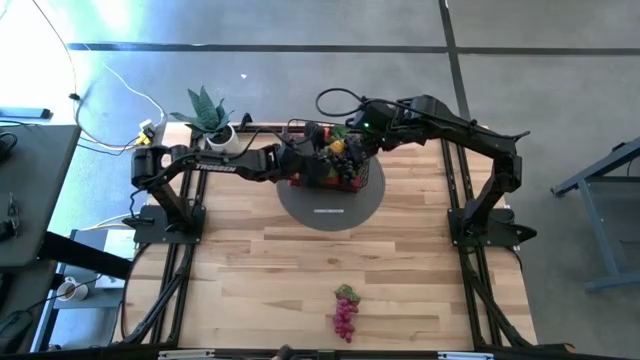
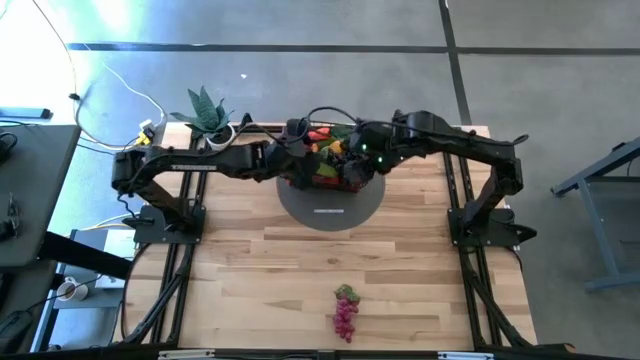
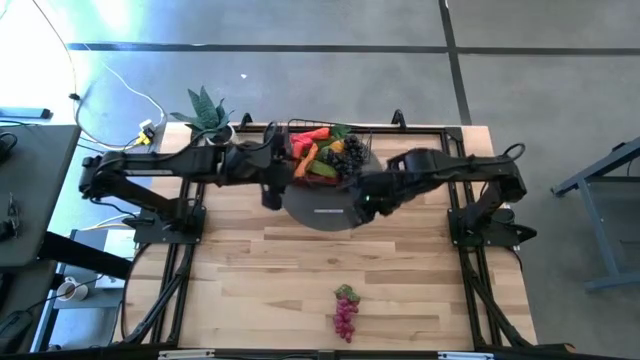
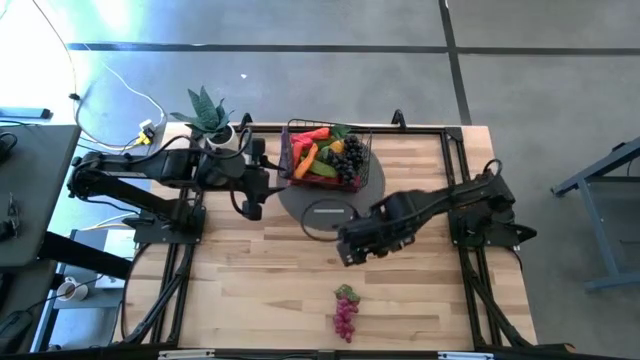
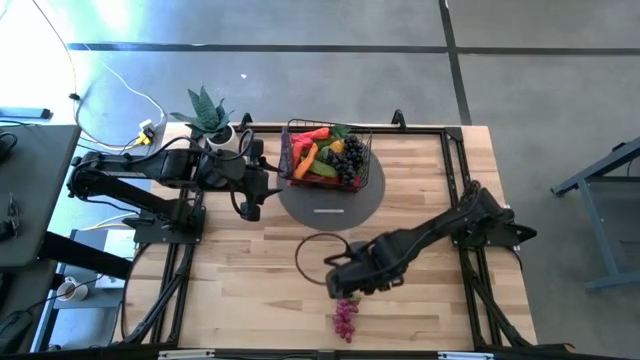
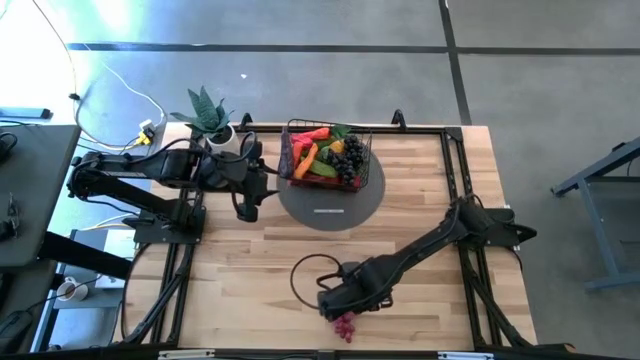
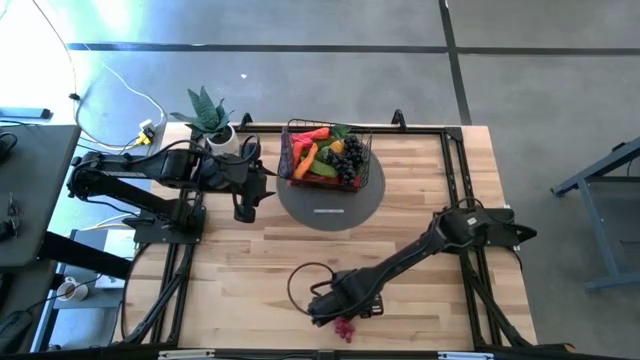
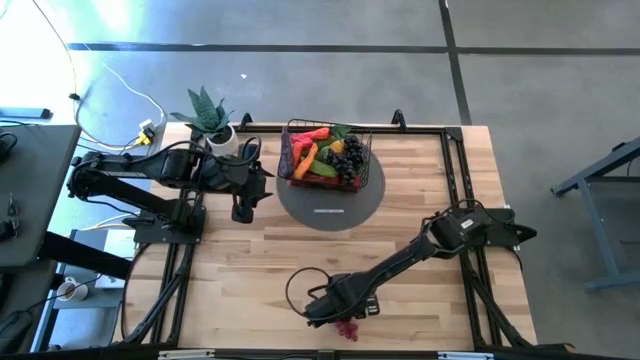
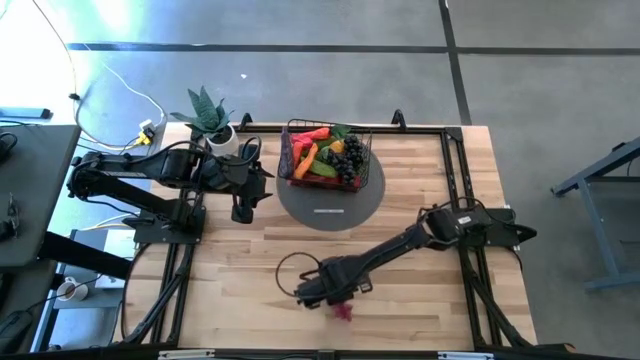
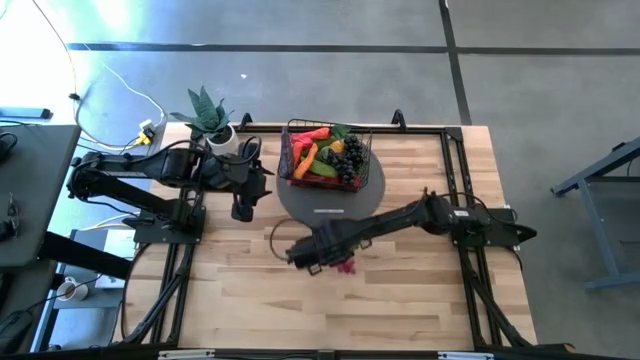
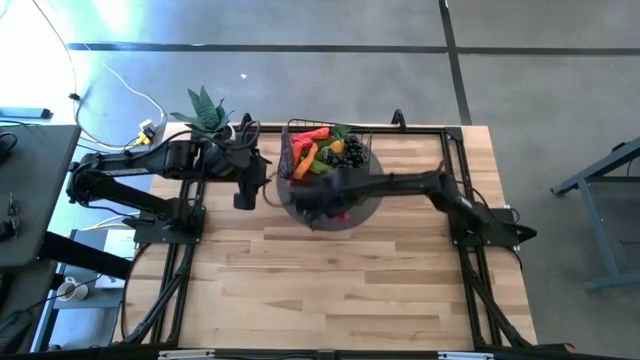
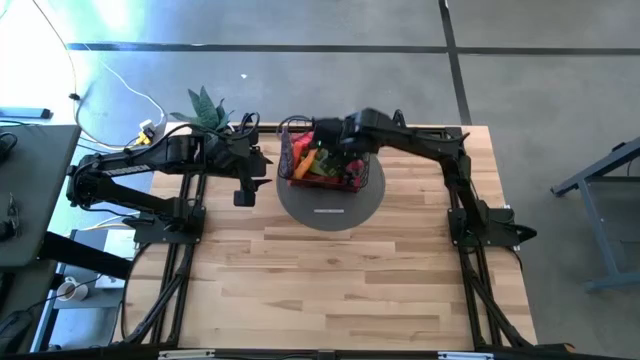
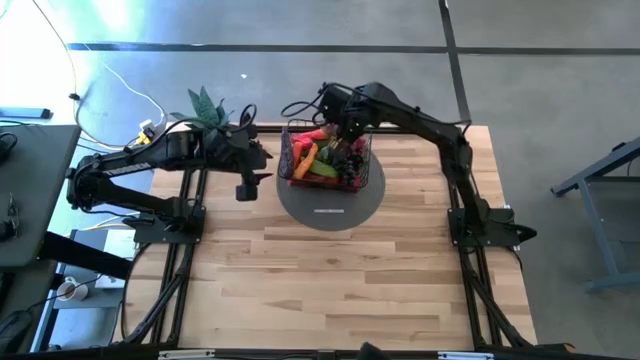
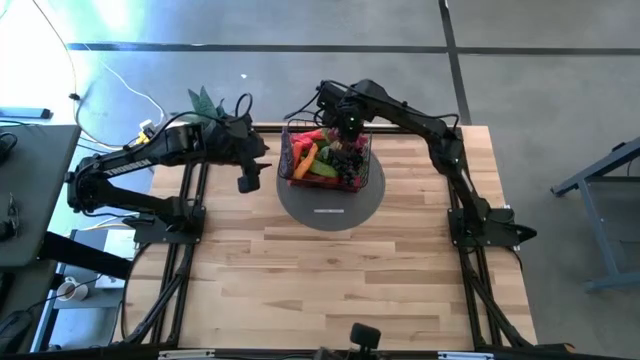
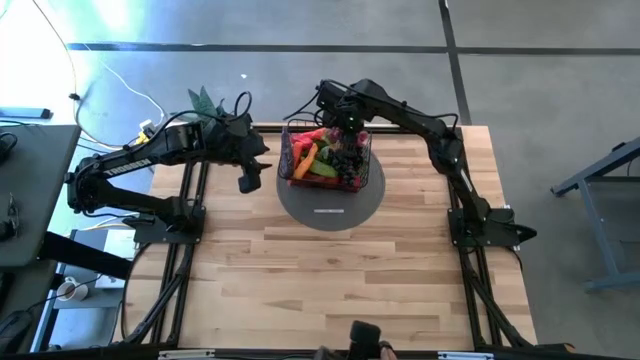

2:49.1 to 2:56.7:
Task: Build produce basket
Put the purple grapes into the wire basket

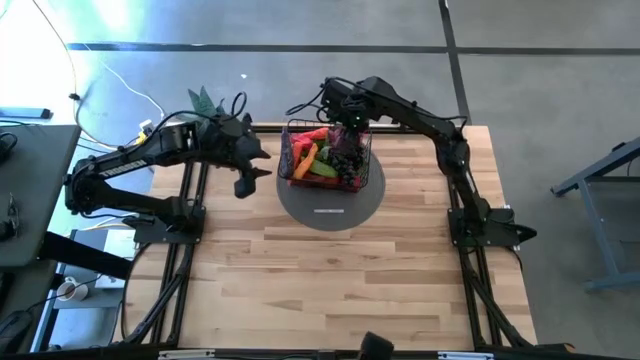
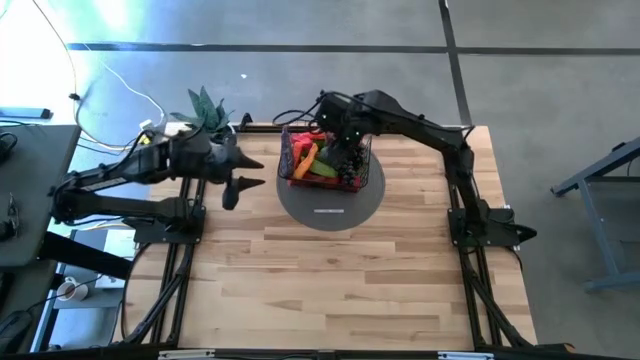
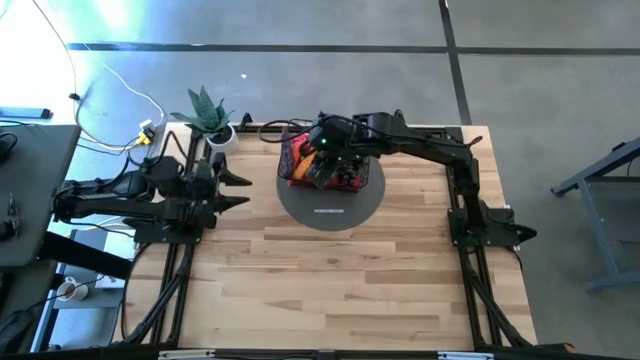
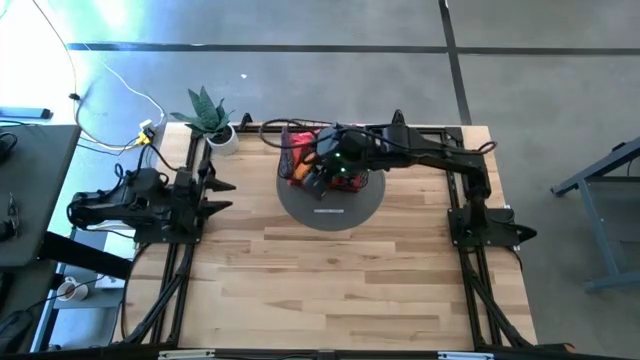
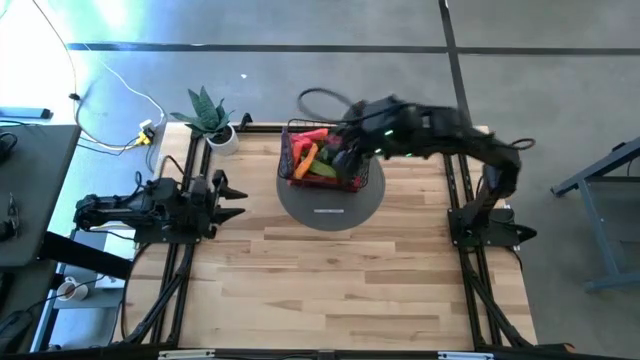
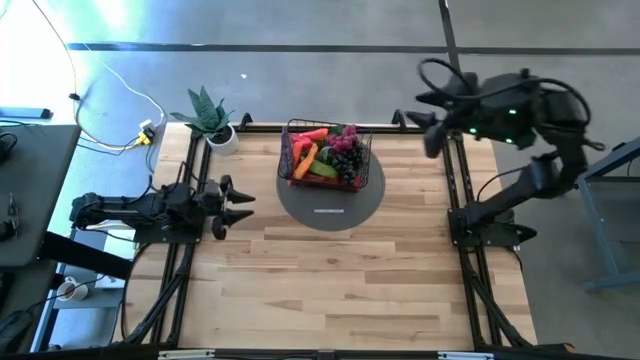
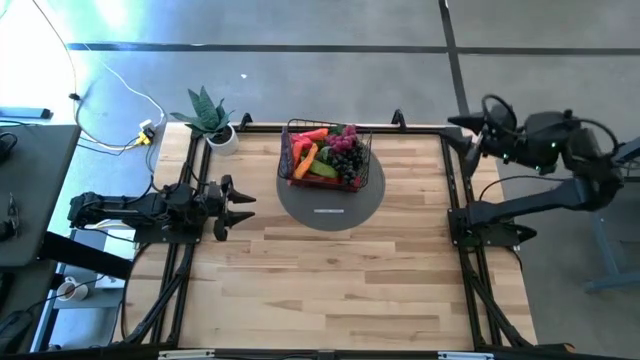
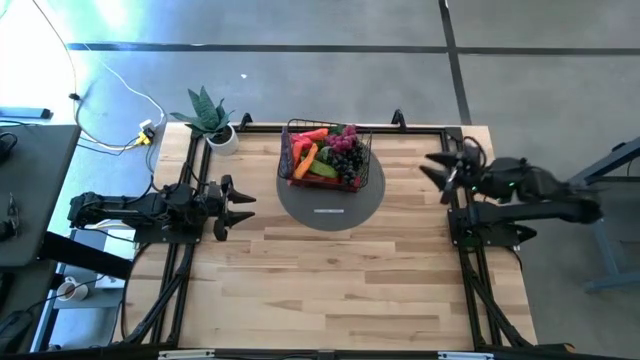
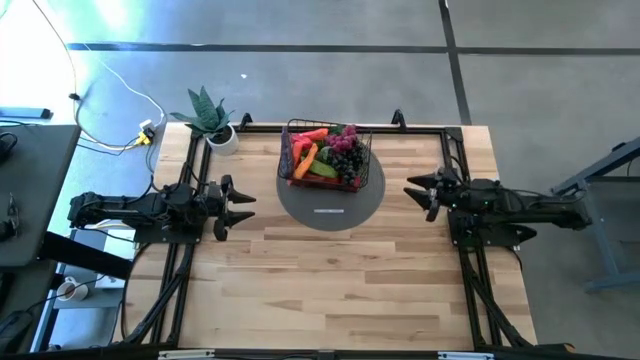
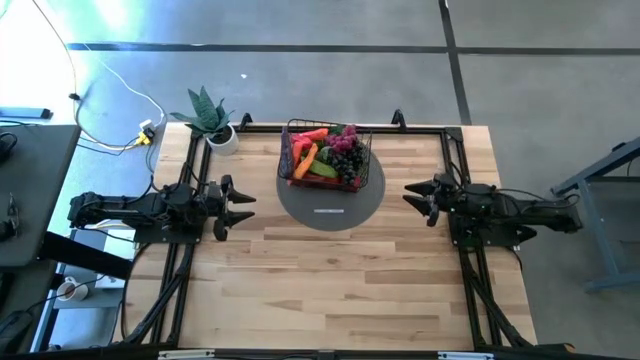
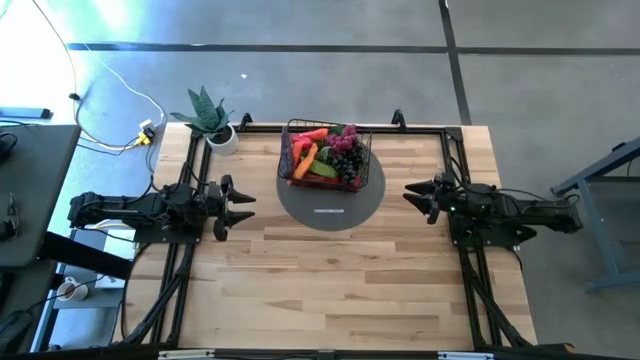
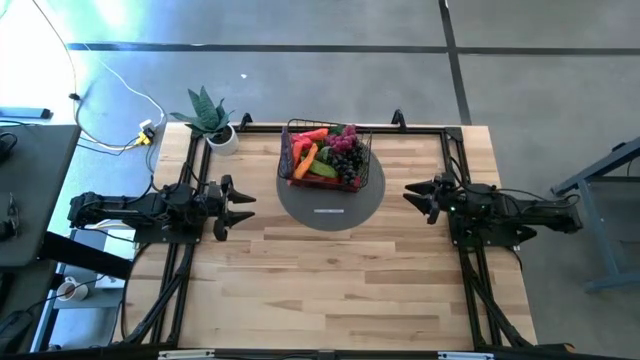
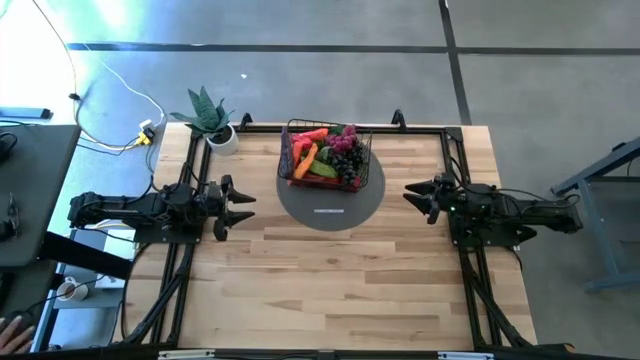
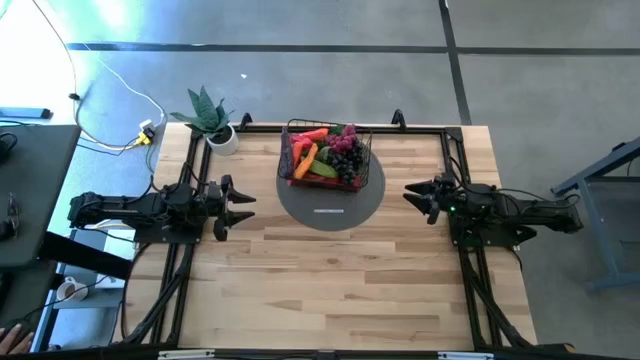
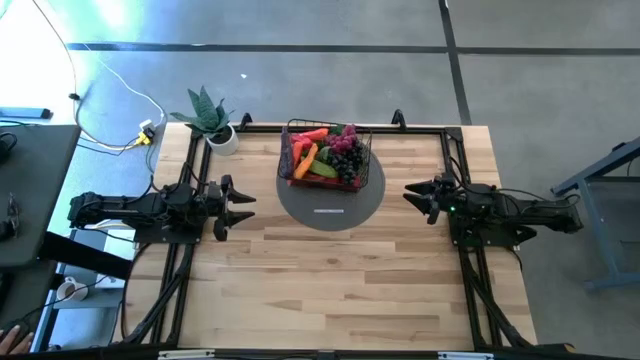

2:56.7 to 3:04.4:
Return to Home Position

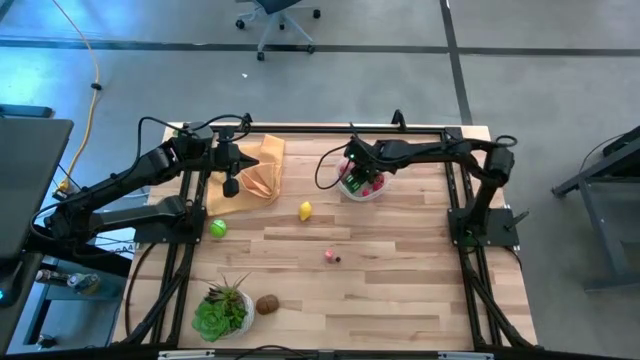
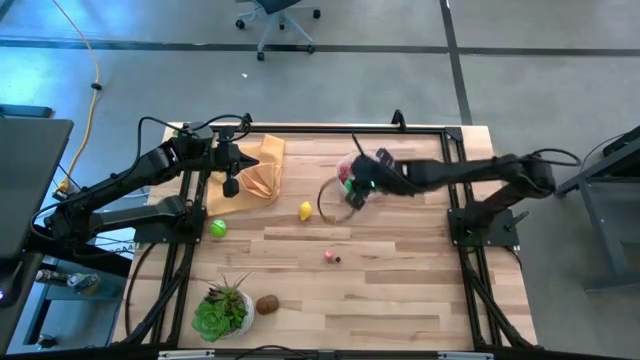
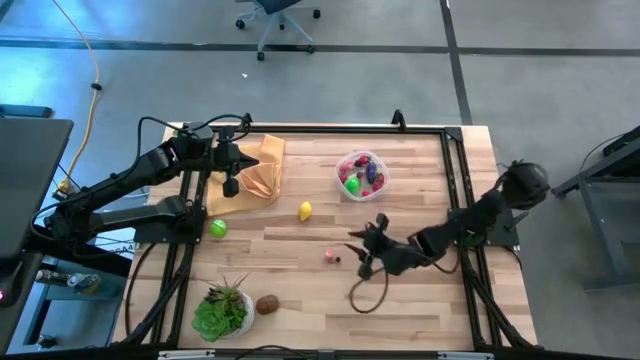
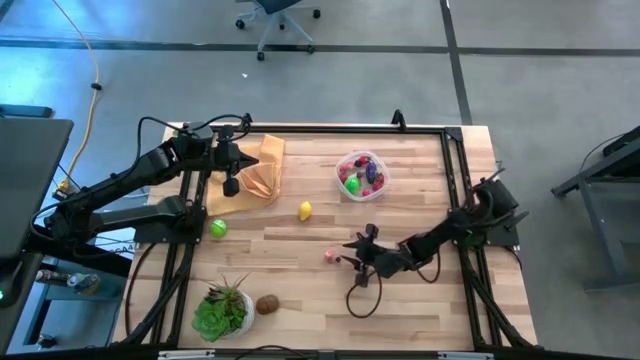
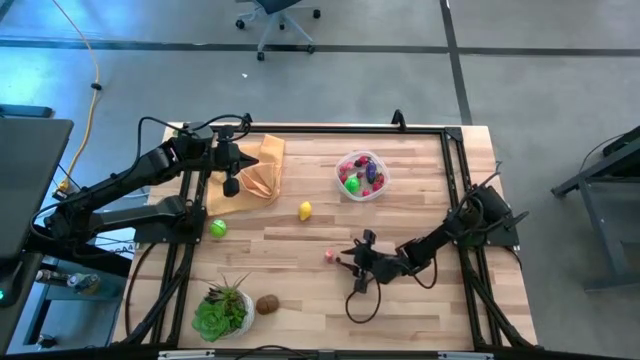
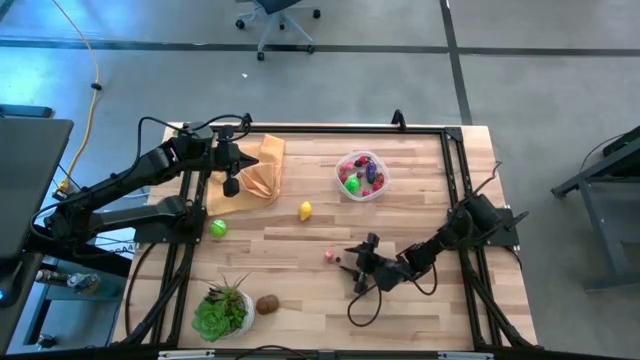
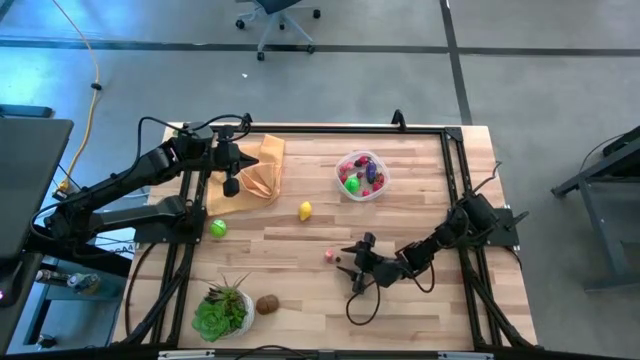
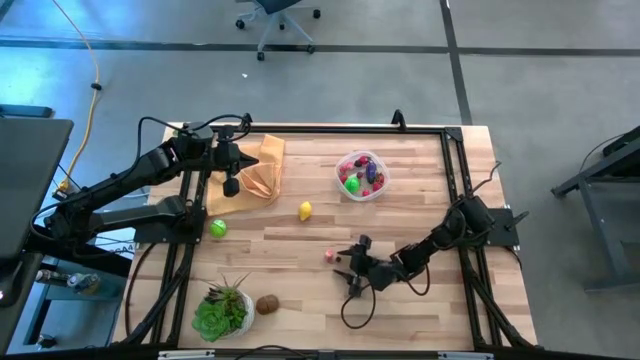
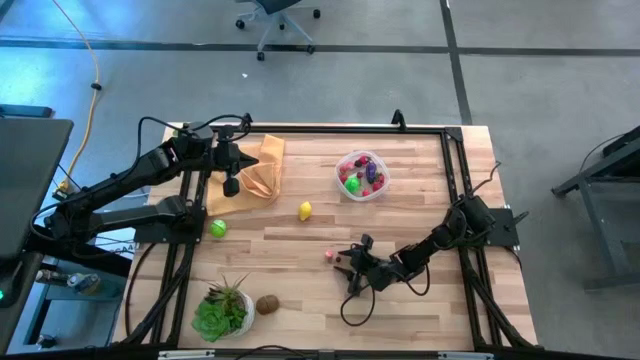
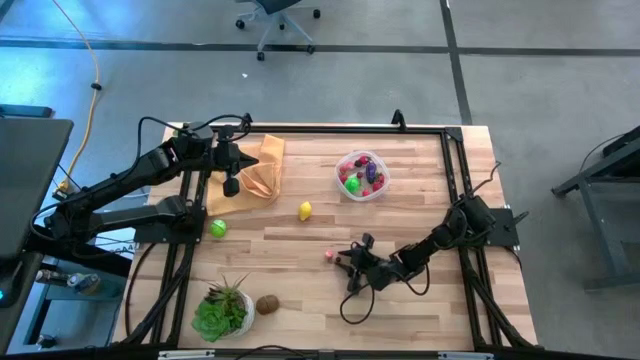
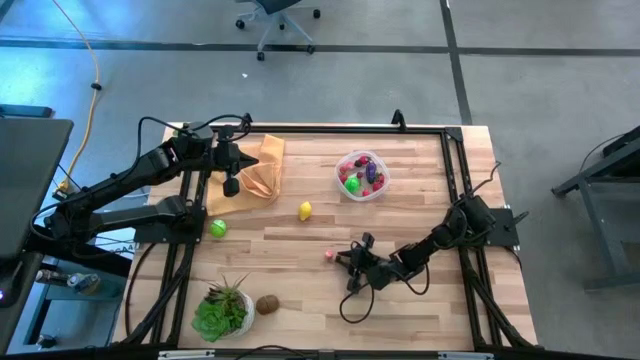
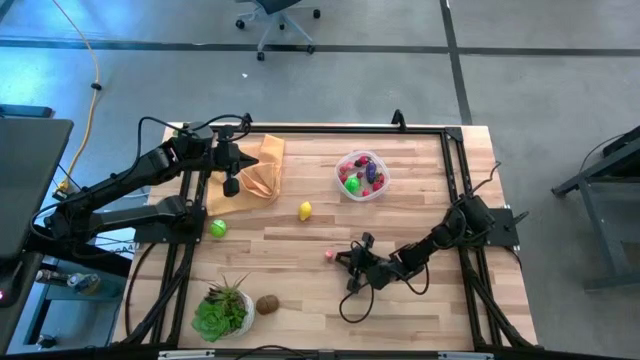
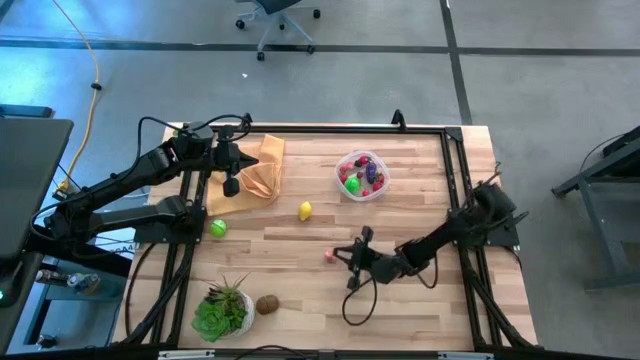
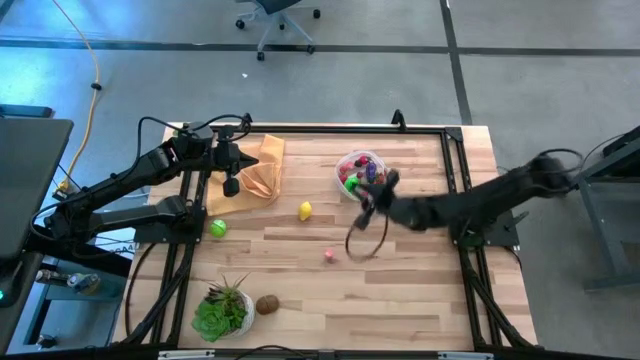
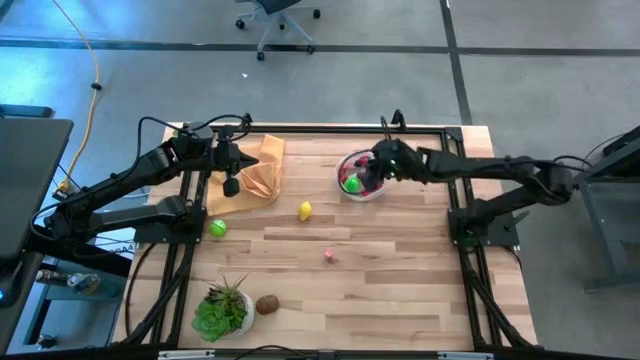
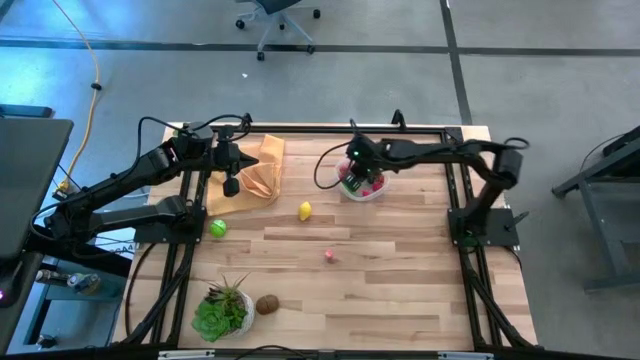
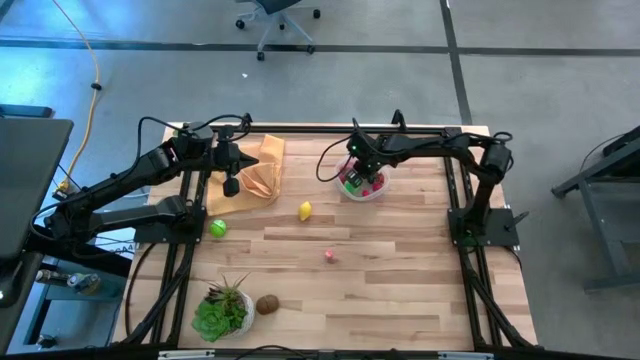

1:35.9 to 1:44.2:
Task: Pick and placing Produce into tupperware
Put the blueberry into the transparent container
